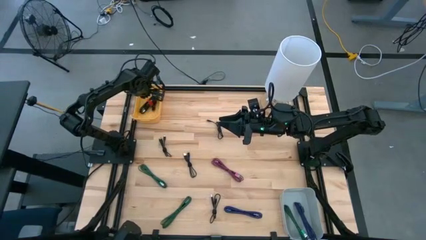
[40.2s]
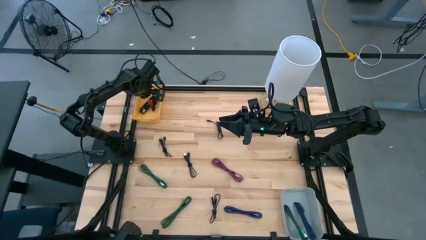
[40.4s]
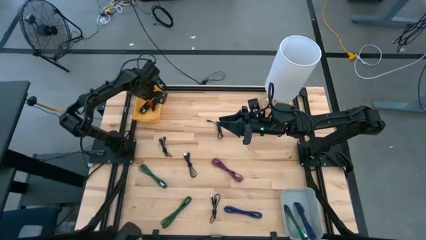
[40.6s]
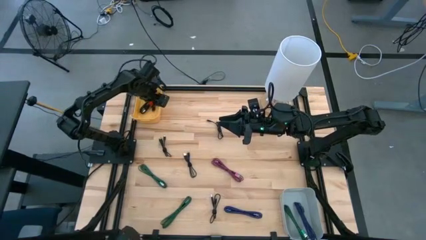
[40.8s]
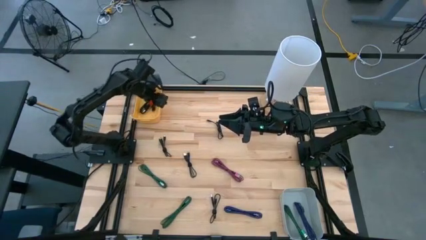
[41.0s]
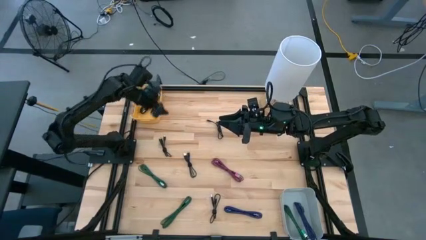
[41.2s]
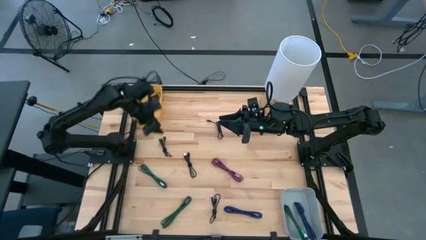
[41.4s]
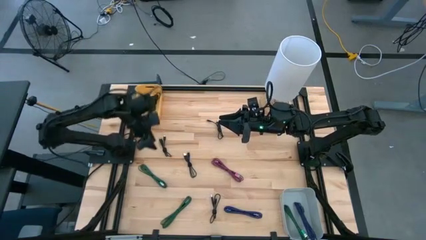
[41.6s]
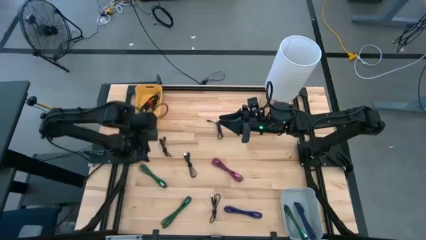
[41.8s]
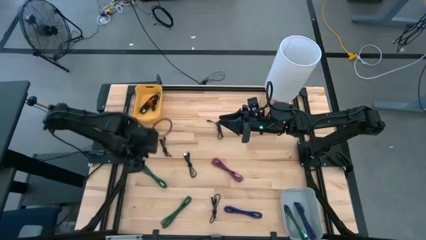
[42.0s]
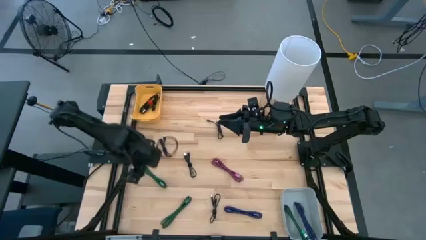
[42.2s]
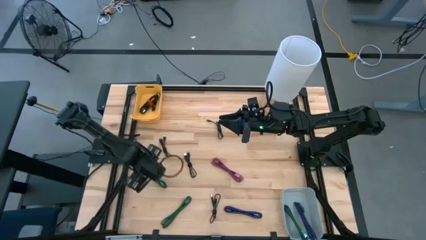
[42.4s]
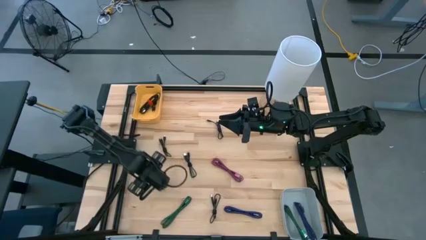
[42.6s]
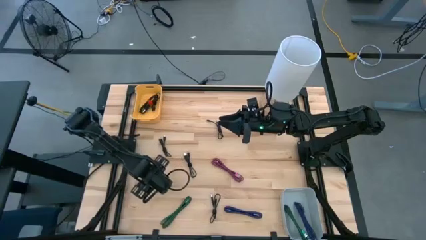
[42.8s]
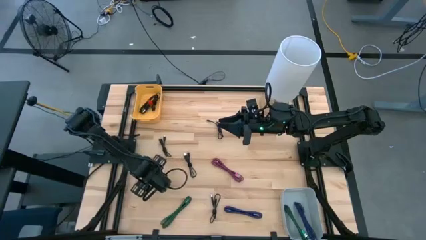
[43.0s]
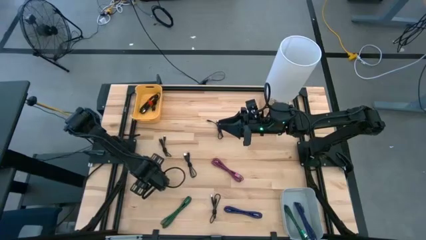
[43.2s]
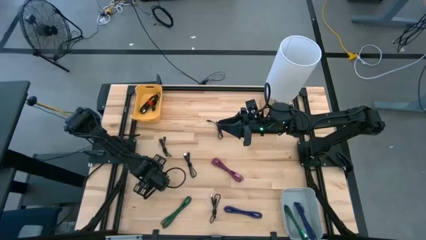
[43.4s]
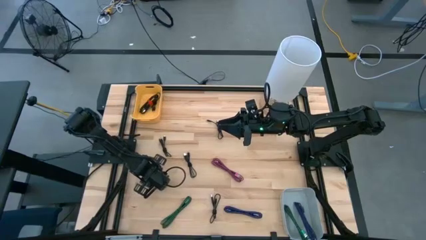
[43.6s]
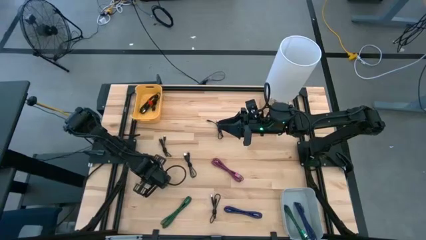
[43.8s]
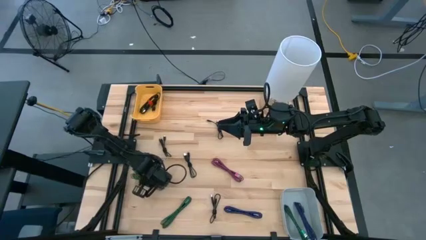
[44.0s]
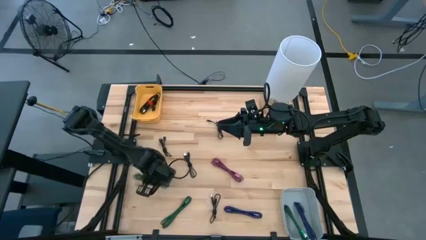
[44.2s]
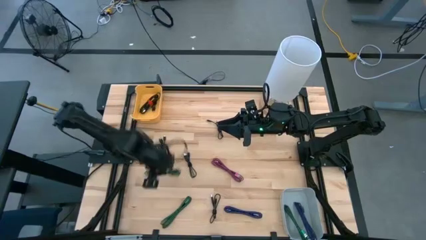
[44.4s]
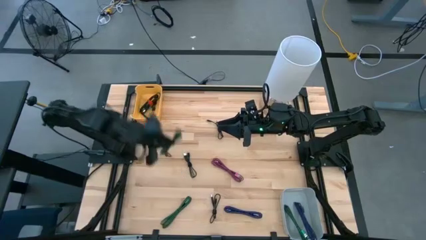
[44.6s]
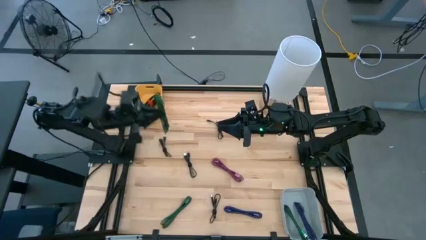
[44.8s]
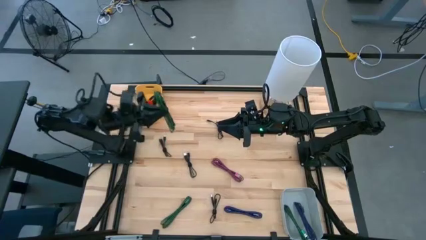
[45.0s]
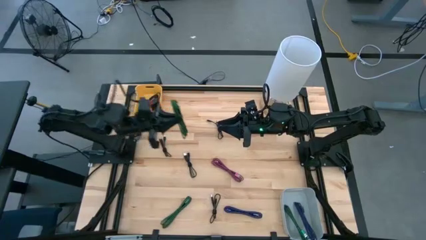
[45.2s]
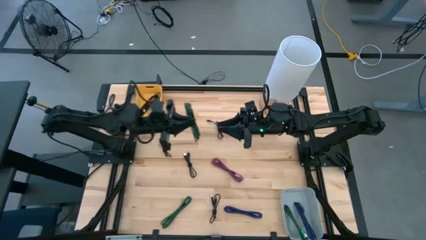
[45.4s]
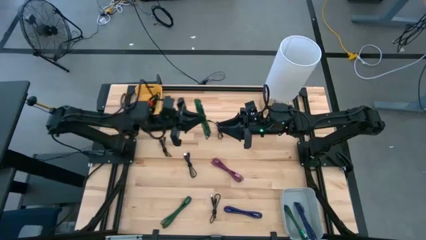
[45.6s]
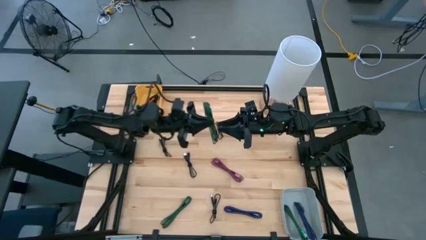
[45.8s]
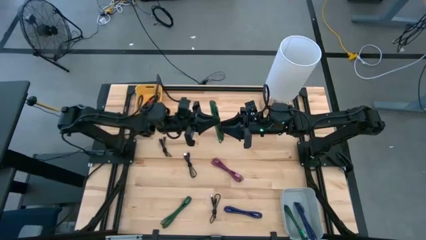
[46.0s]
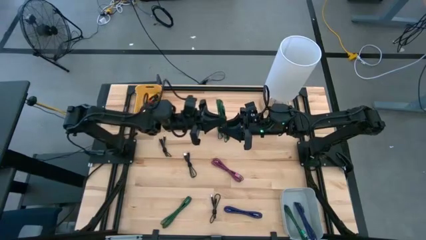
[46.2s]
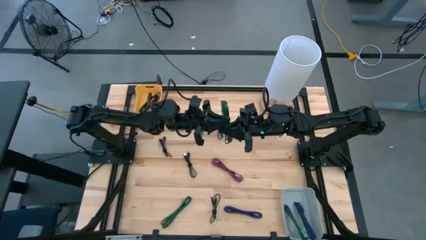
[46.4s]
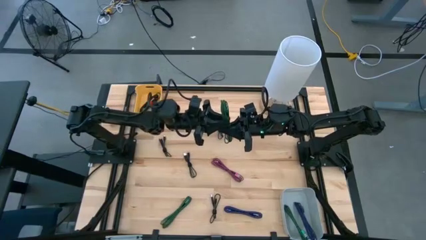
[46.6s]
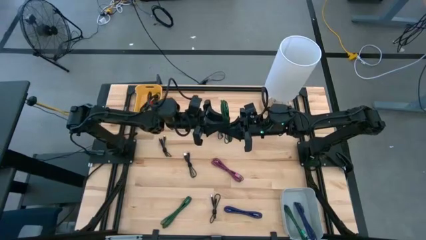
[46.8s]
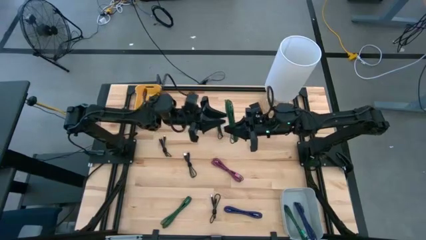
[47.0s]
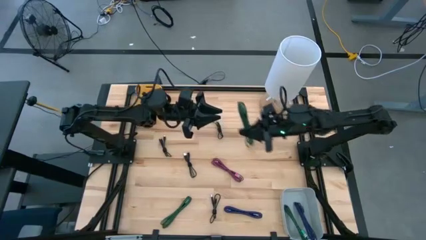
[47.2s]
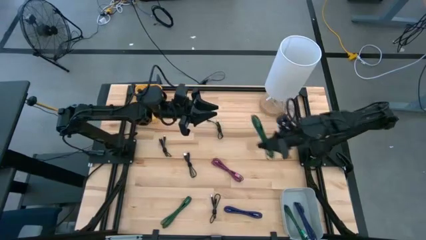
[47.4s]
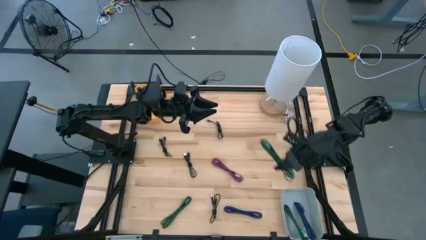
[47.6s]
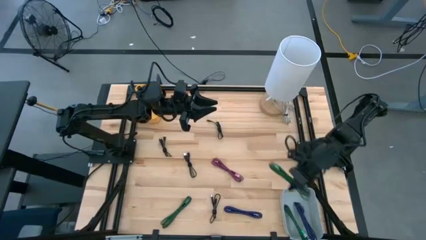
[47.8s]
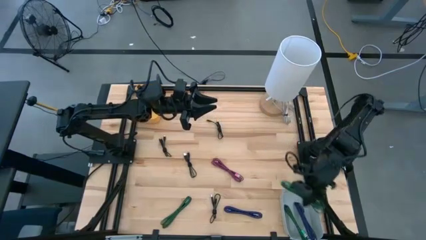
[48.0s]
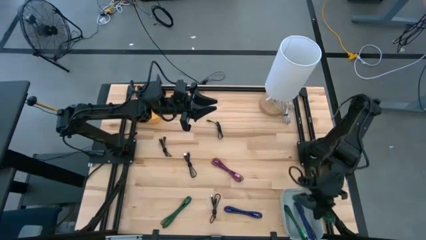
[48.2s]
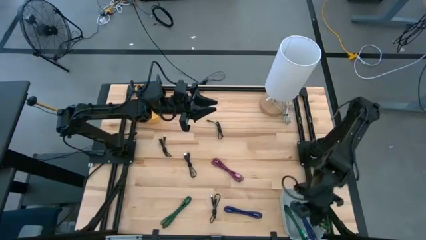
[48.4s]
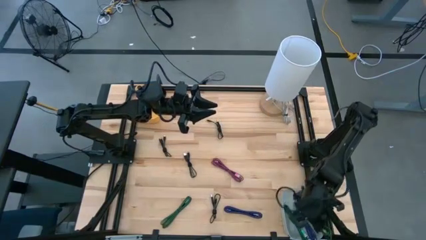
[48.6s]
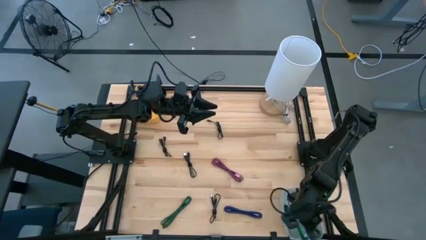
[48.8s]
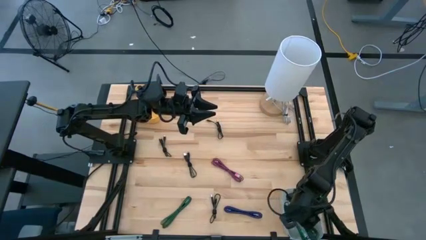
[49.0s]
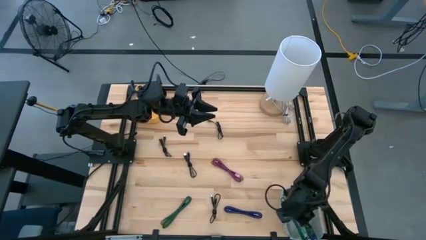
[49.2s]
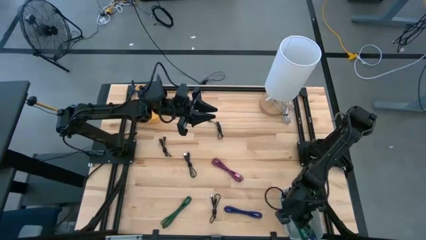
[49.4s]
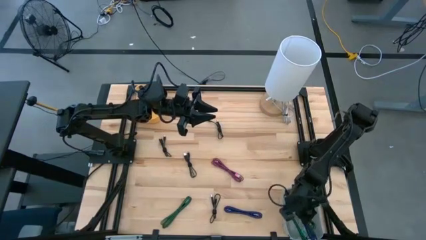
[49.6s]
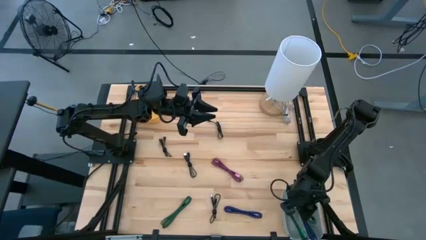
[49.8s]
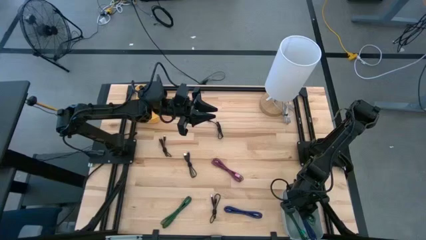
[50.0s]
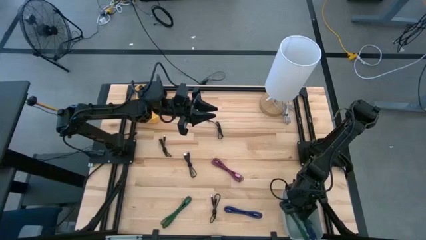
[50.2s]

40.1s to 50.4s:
Task: Pick & Place USB Port
Put the green charger cable into the gray bin

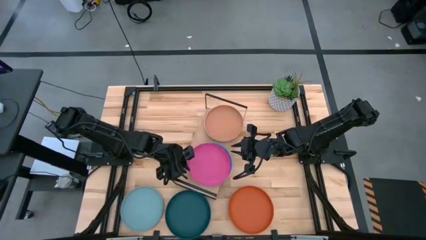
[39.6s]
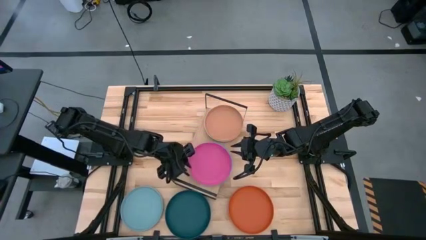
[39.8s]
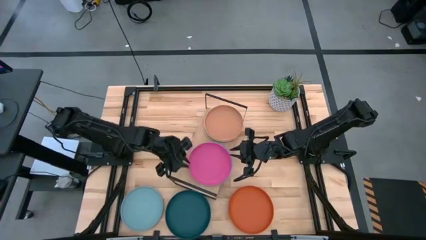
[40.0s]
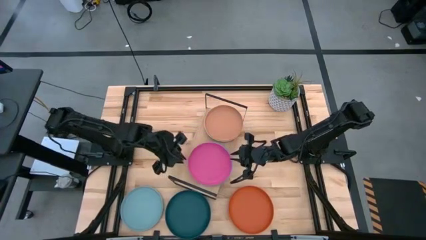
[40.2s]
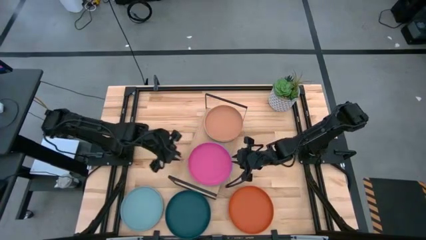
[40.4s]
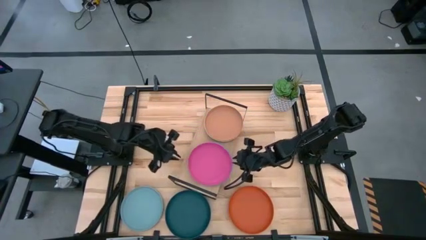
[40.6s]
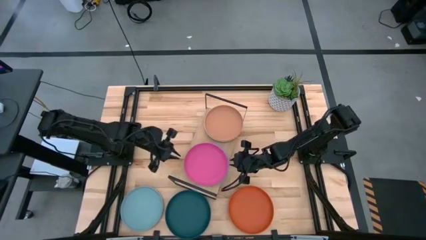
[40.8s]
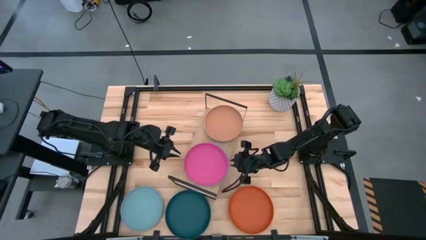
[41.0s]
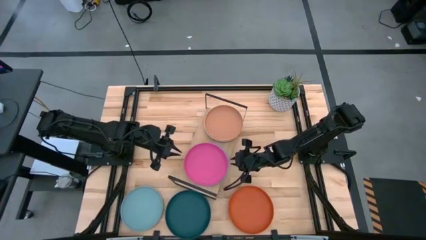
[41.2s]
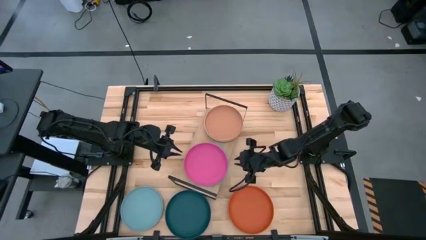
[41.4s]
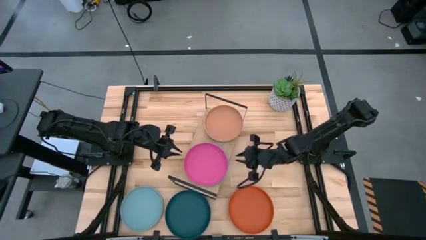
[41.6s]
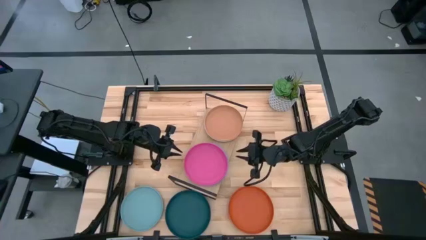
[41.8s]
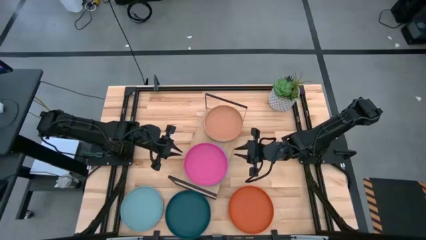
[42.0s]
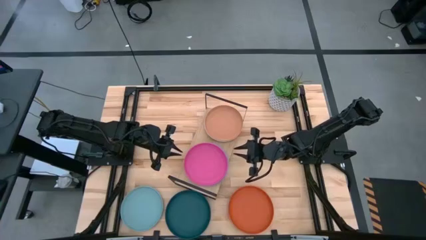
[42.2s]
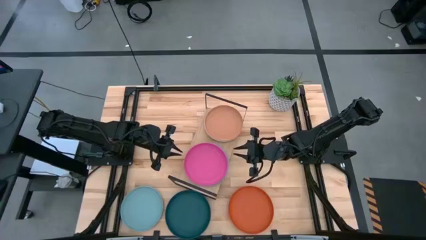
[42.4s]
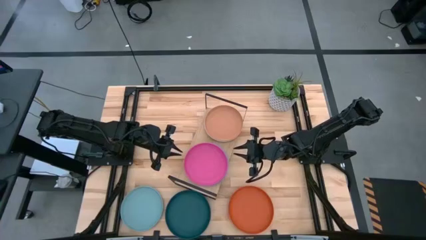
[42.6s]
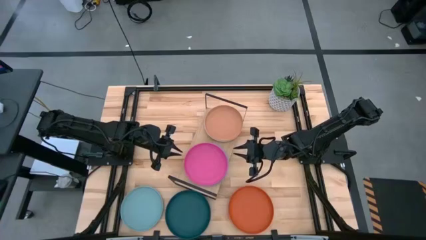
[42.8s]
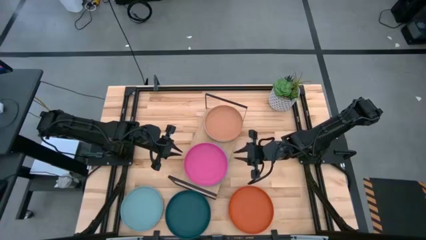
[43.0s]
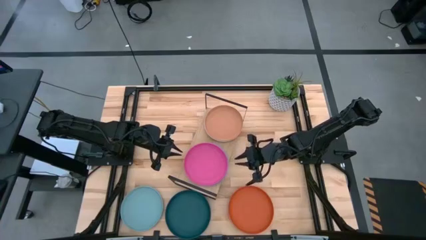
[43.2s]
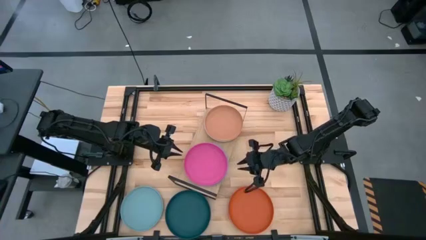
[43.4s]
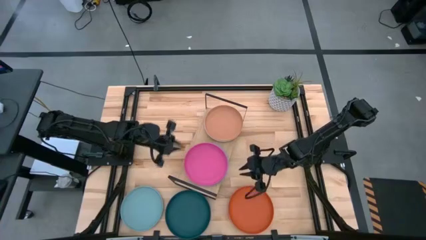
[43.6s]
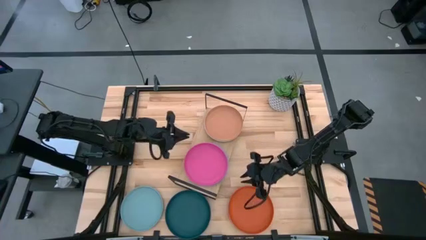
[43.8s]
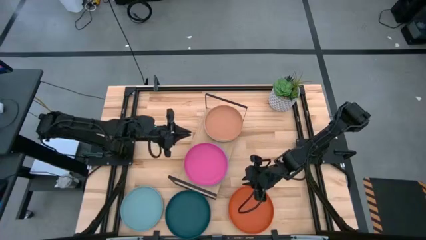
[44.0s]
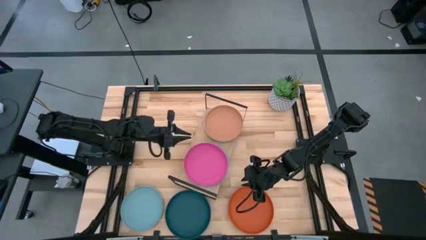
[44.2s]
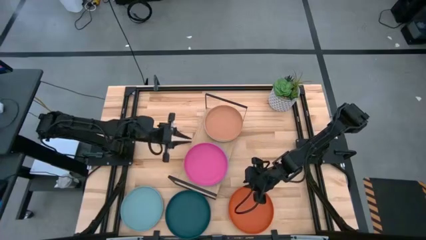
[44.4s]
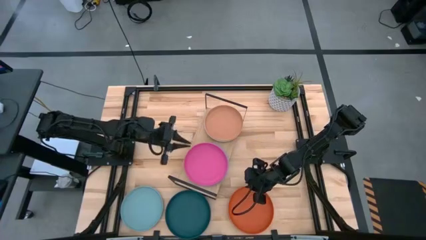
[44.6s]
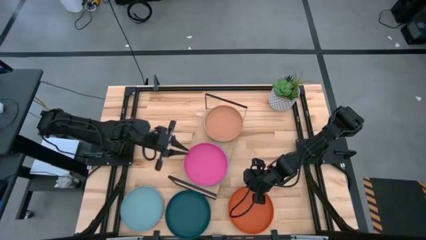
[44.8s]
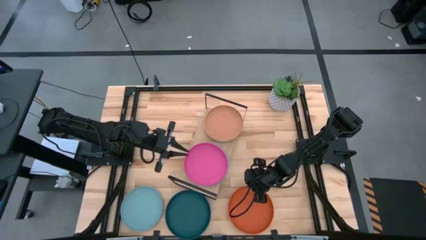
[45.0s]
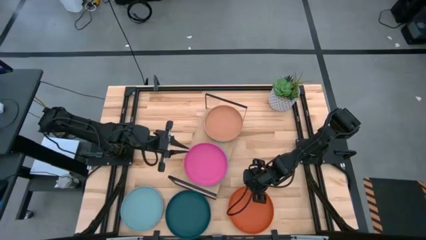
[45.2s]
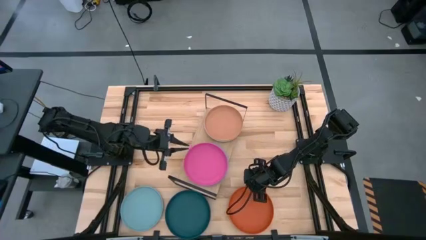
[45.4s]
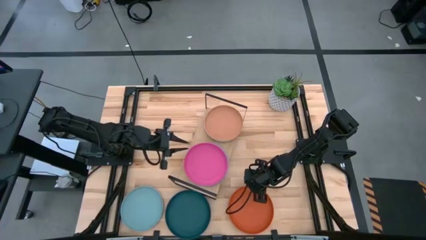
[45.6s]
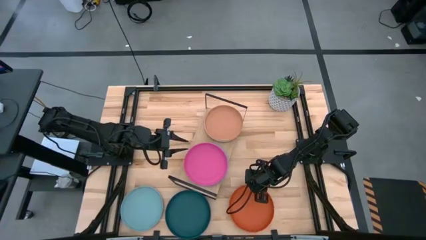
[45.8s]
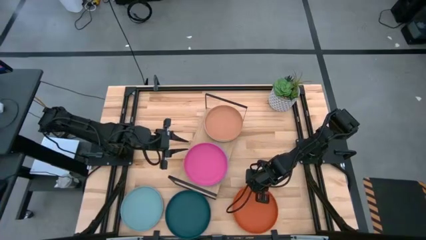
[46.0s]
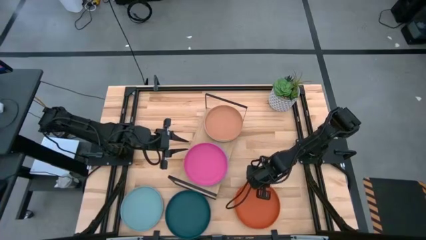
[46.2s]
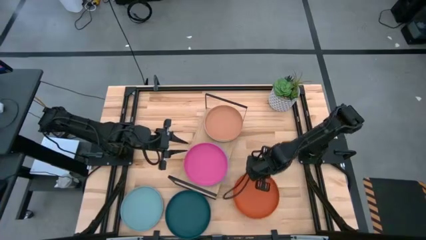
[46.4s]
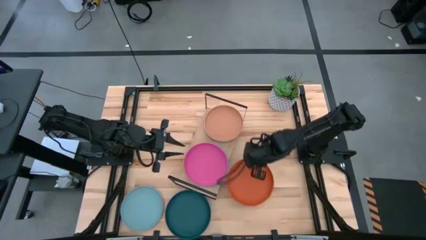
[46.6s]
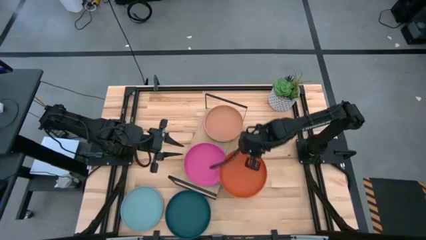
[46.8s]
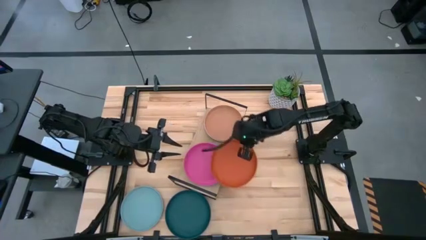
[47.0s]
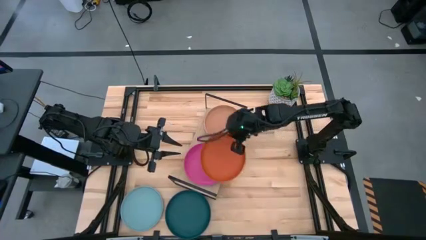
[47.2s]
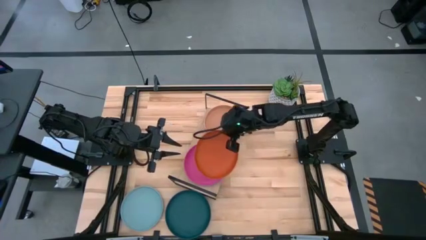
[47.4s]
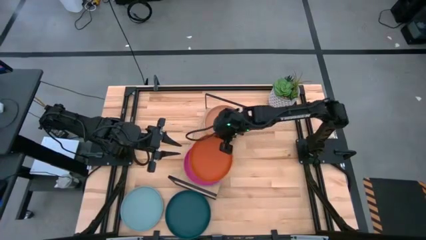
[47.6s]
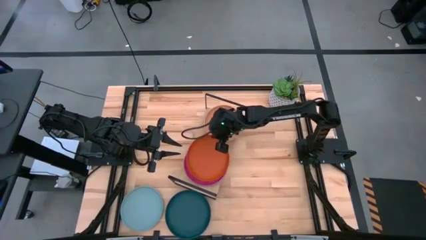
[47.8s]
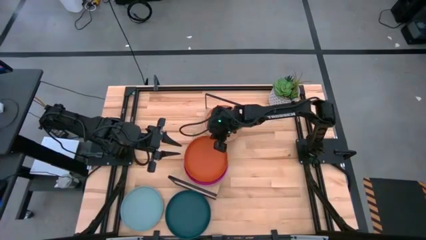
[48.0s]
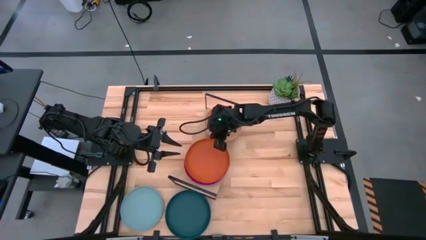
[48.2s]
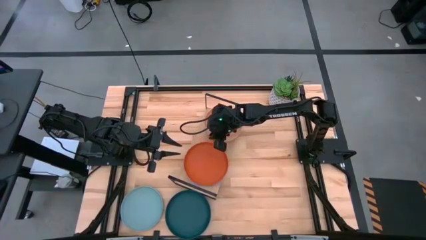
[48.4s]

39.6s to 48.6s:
Task: Place and stack plates onto a shelf
Stack the dark orange plate on top of the pink plate on the shelf
